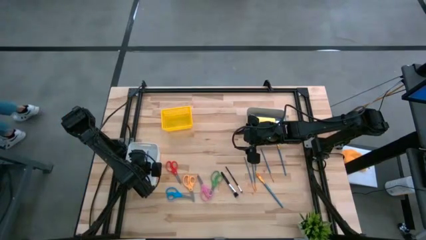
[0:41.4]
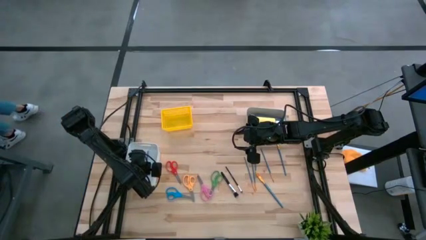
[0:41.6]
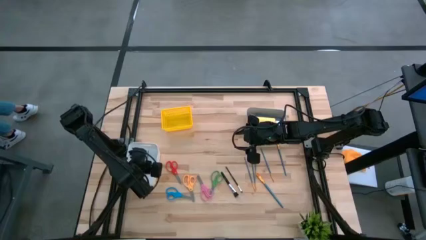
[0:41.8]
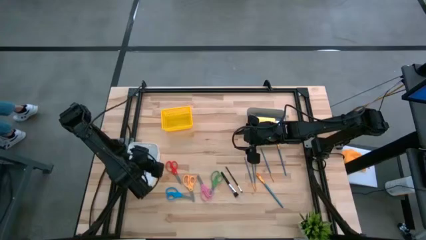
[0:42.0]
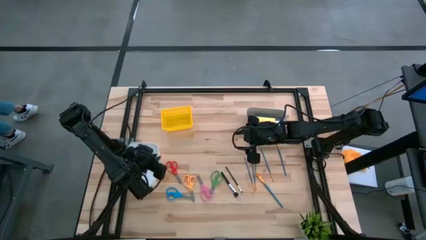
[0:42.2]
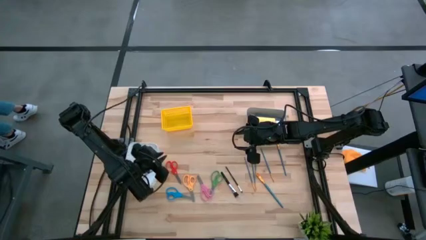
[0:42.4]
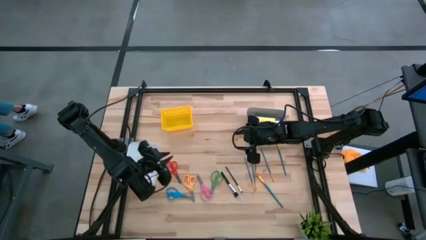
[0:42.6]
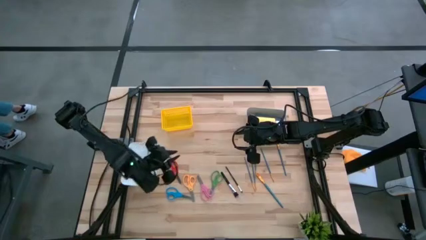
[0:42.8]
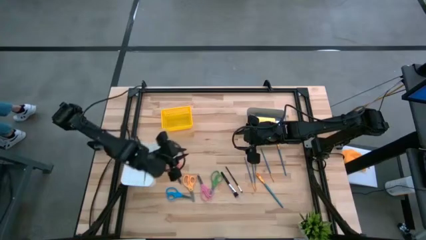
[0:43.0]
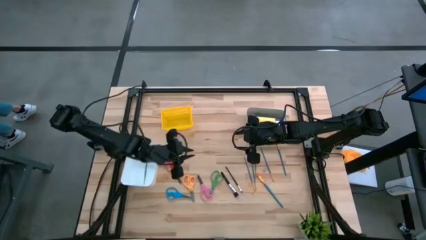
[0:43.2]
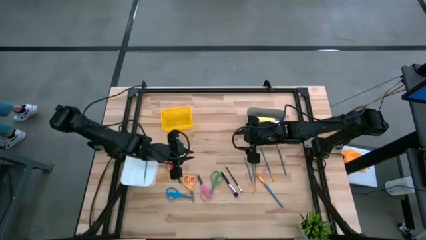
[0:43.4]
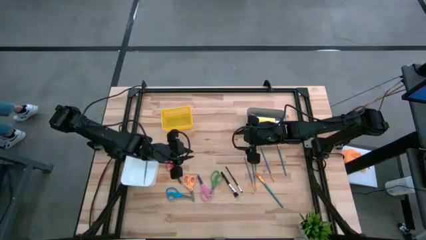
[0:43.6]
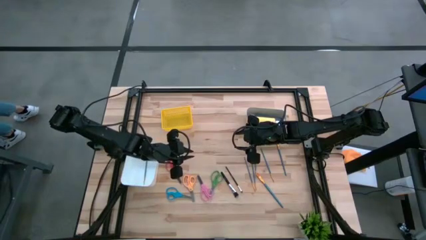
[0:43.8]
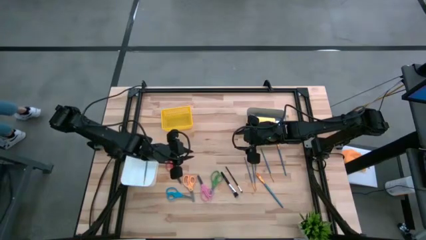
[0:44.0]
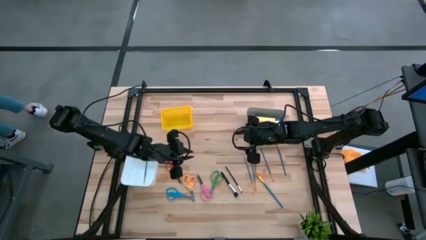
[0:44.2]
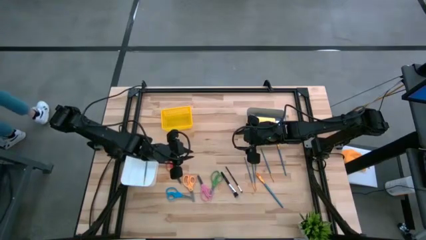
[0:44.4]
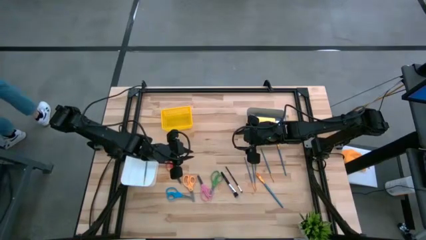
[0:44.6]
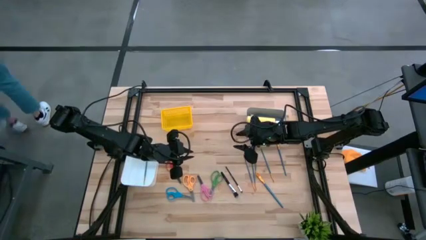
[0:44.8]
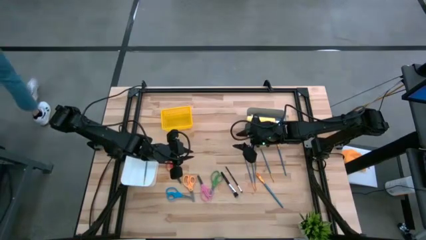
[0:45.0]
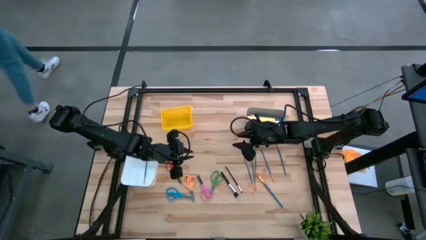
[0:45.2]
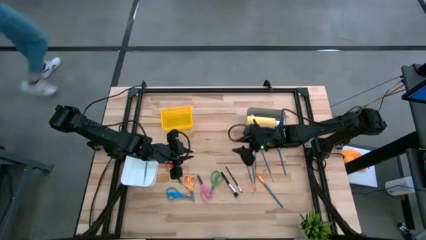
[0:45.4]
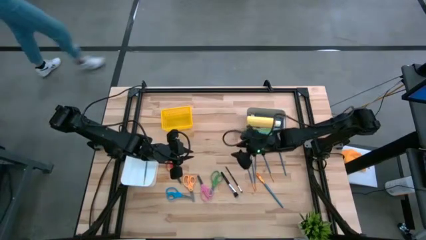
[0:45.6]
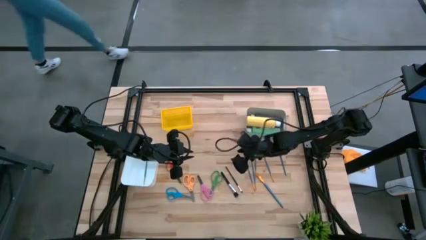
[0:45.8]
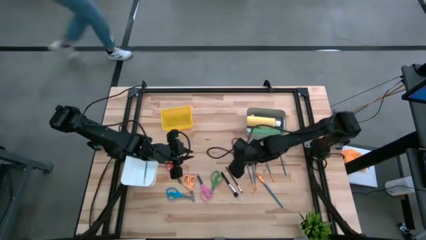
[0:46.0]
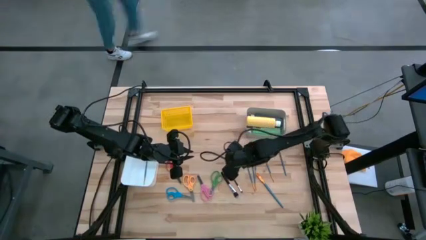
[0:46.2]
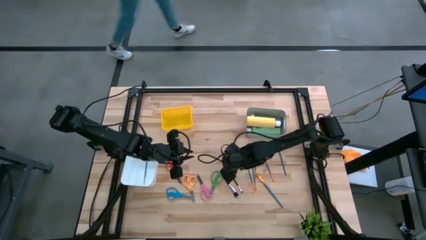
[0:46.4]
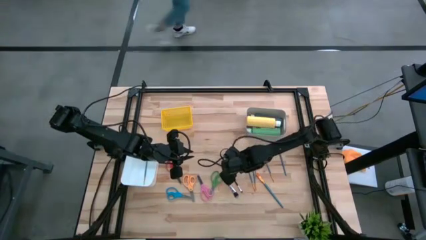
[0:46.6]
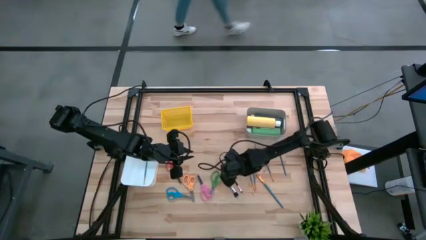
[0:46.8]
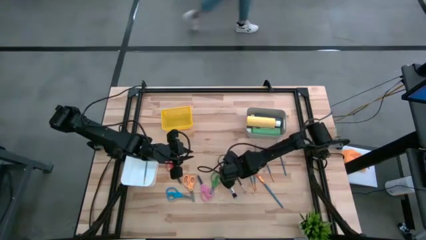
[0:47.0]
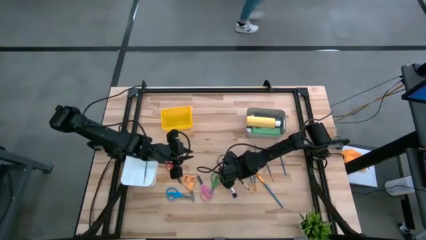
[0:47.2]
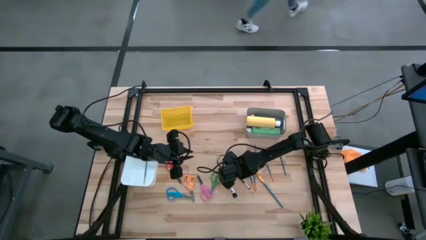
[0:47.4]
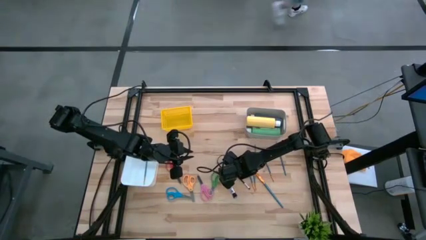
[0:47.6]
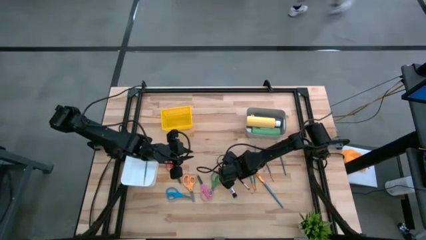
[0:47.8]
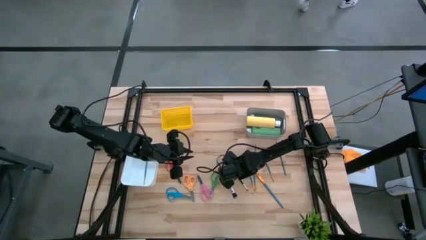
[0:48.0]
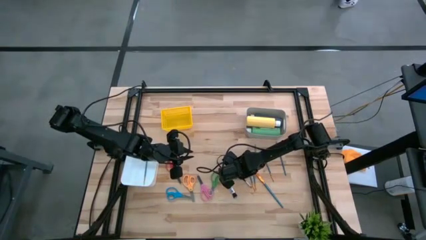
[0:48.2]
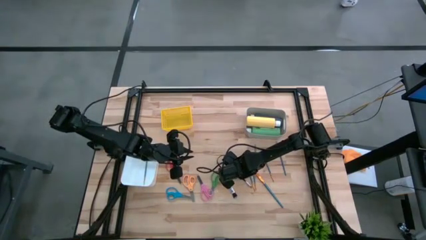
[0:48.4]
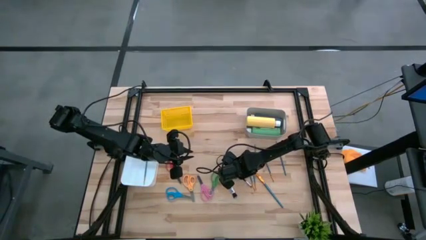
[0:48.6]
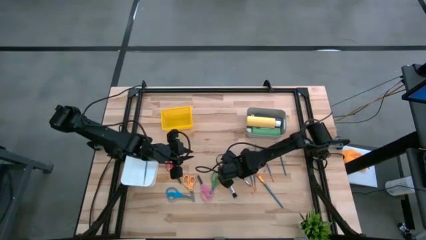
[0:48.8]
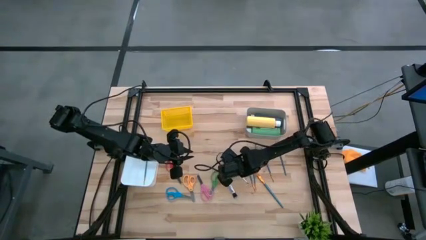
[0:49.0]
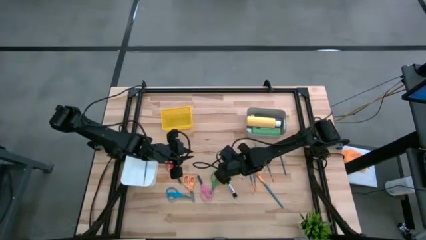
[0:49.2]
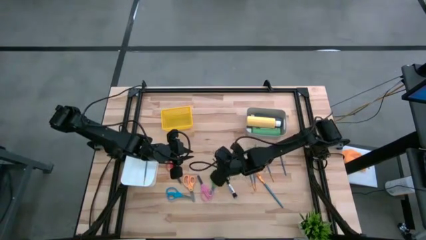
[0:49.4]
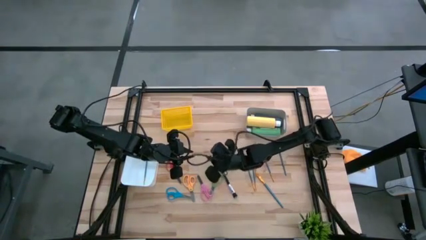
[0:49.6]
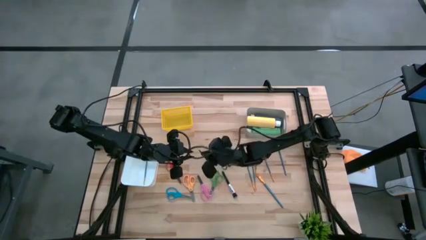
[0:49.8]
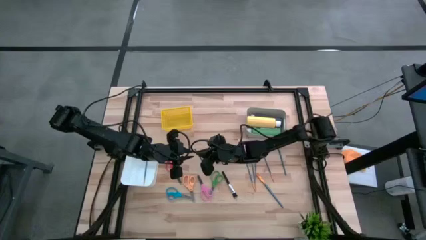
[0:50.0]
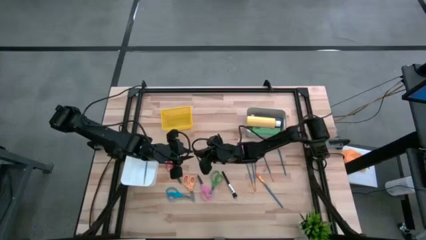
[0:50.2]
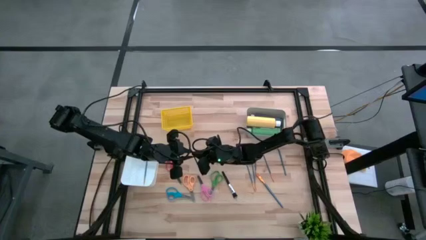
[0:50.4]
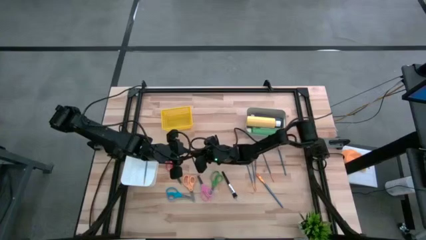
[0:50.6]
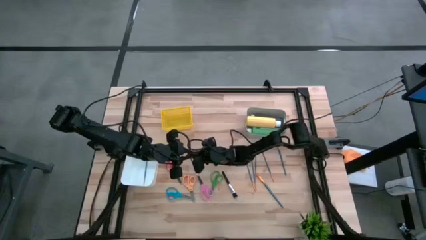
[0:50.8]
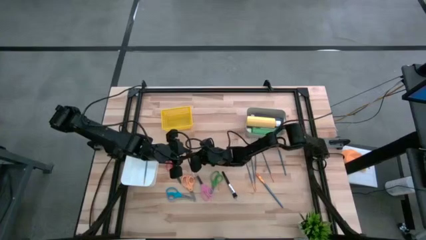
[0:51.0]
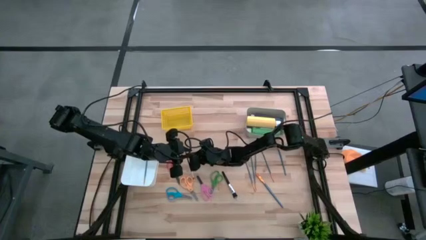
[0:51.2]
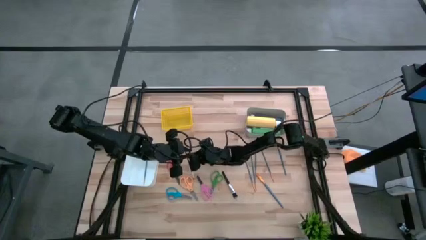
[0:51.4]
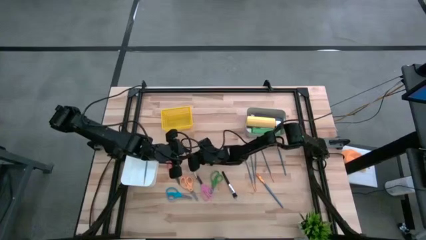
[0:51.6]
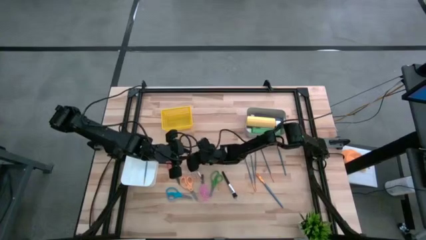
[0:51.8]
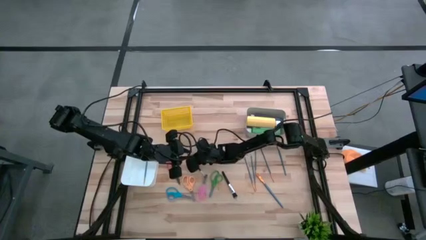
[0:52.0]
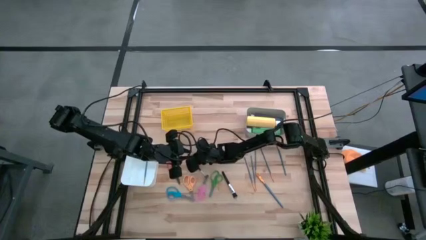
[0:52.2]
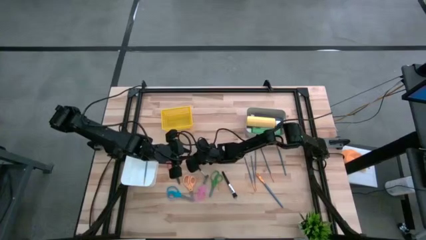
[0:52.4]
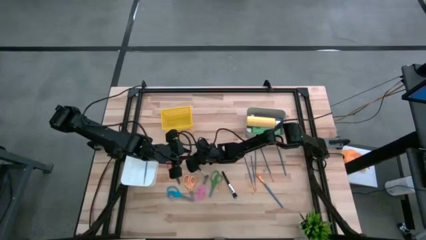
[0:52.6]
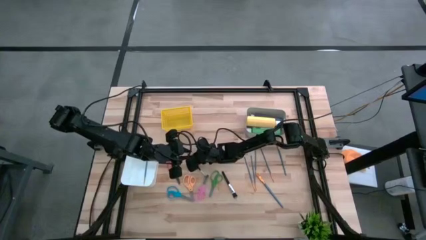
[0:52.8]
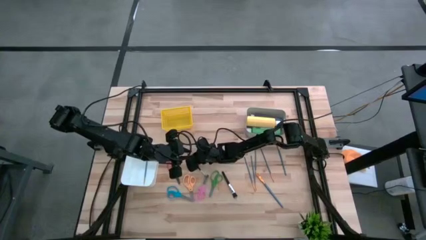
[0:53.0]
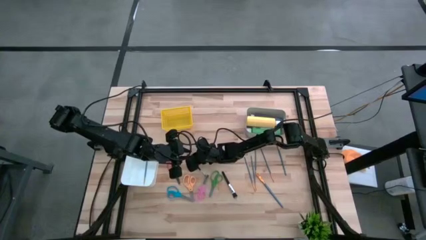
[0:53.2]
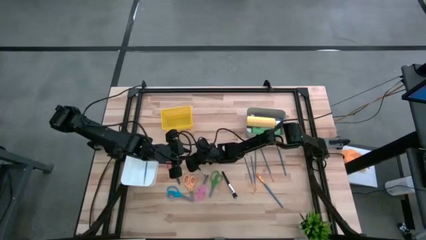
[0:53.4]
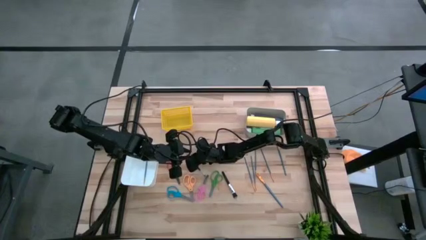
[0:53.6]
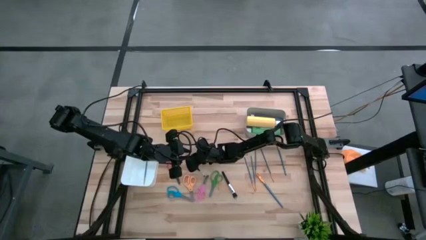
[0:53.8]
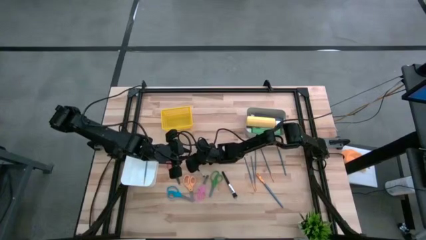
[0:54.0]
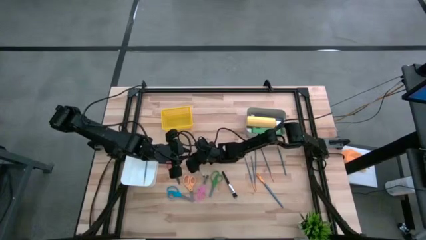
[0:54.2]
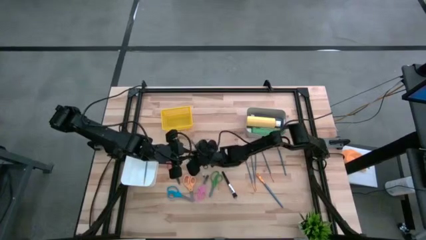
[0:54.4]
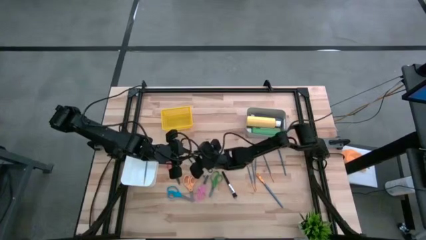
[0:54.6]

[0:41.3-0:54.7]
Task: Pick & Place Paint Supplies
Put the black eyeshadow brush into the white bin
